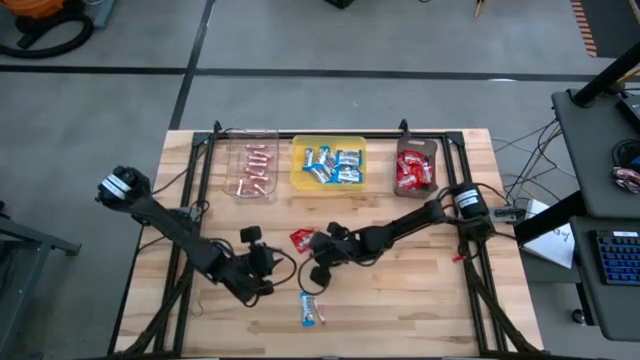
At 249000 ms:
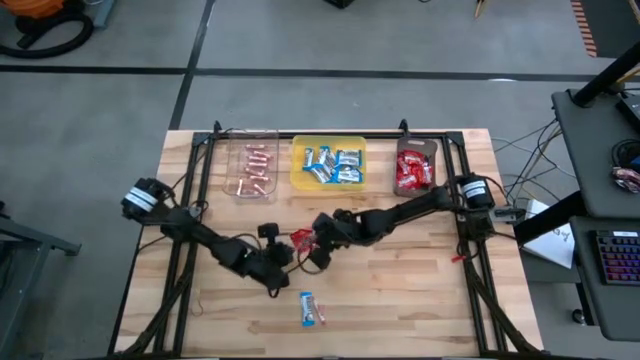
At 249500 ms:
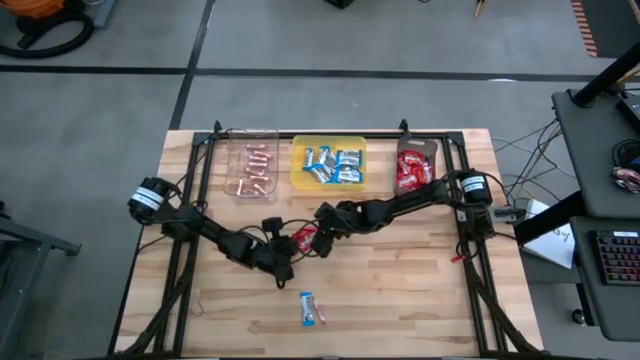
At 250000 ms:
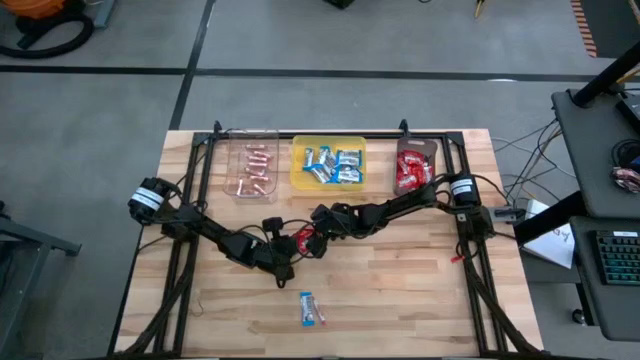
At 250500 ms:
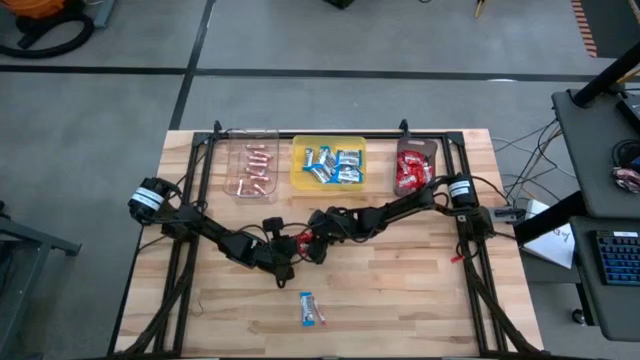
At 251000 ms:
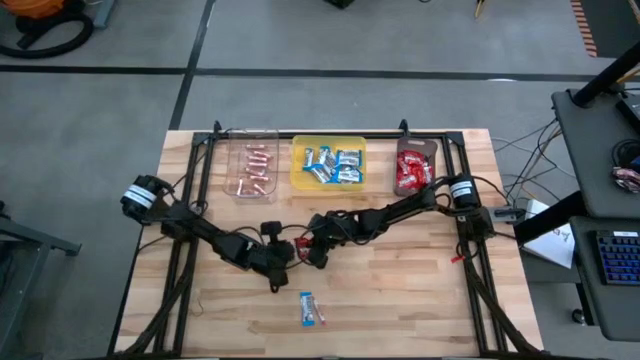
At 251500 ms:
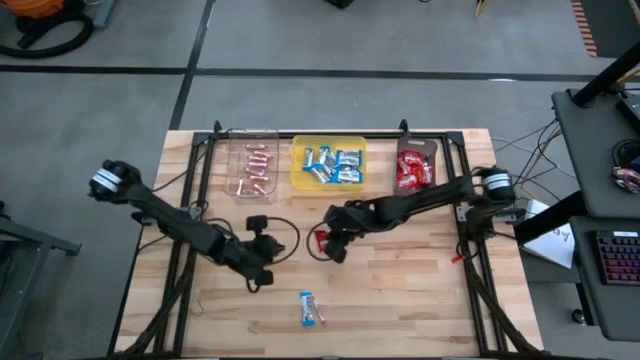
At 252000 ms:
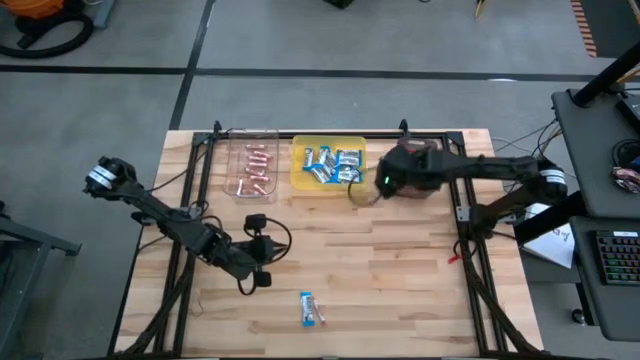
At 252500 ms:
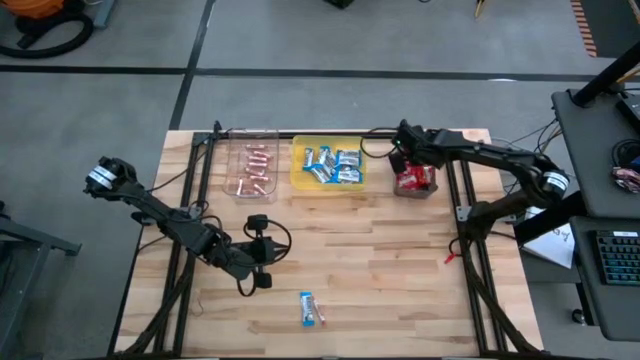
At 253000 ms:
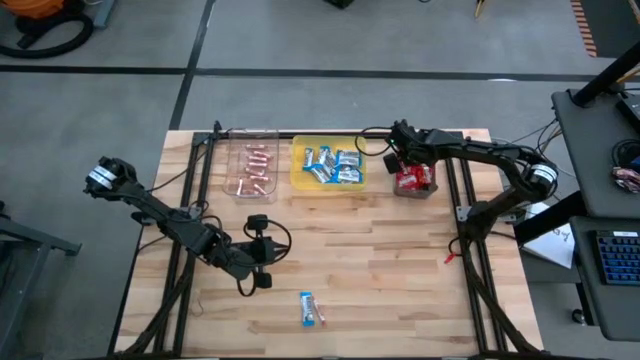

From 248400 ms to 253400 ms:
Task: Sort candy
Put the red candy into the black bin

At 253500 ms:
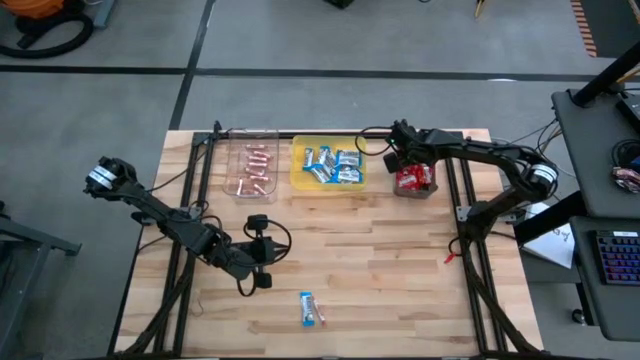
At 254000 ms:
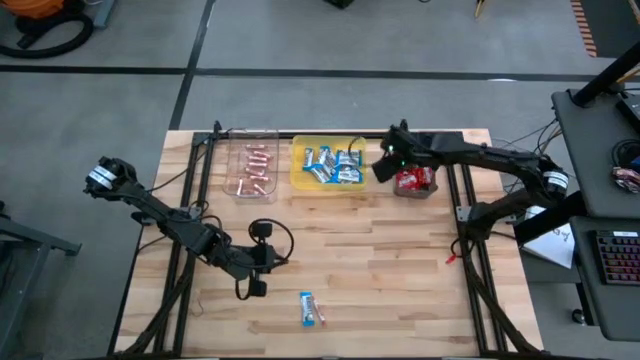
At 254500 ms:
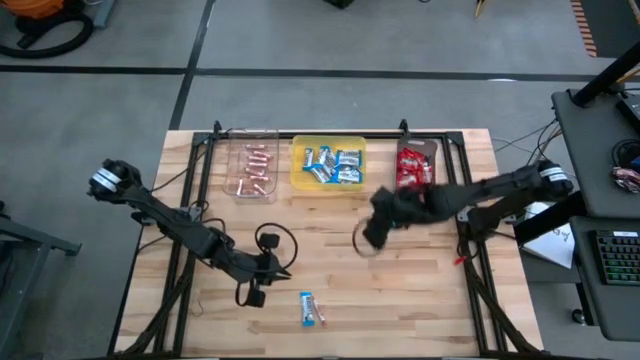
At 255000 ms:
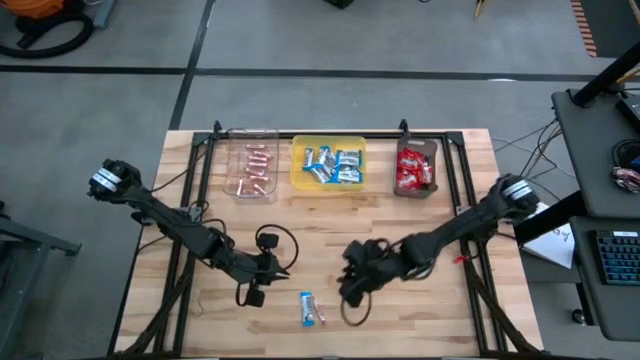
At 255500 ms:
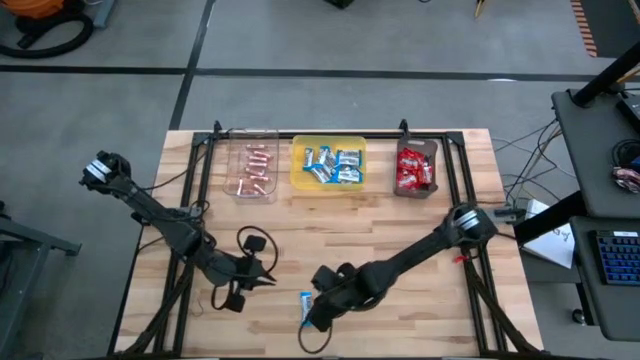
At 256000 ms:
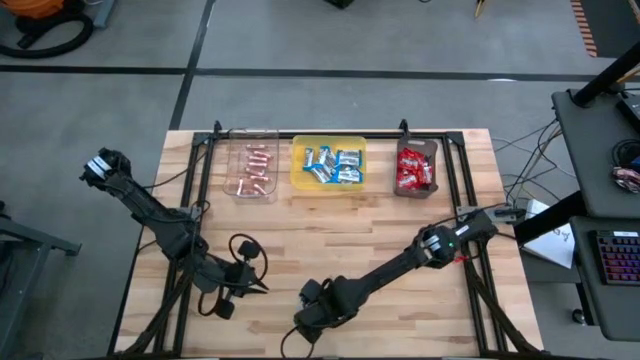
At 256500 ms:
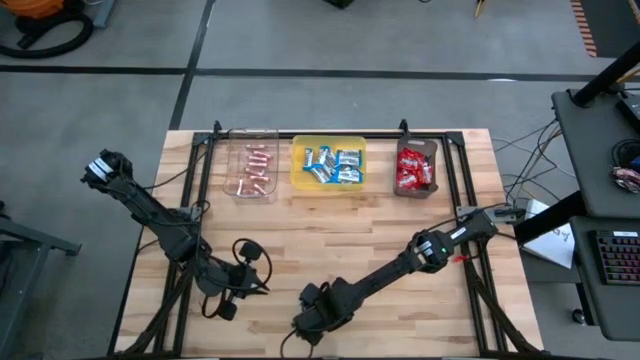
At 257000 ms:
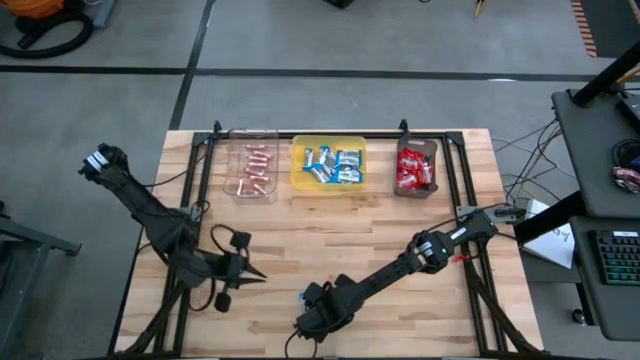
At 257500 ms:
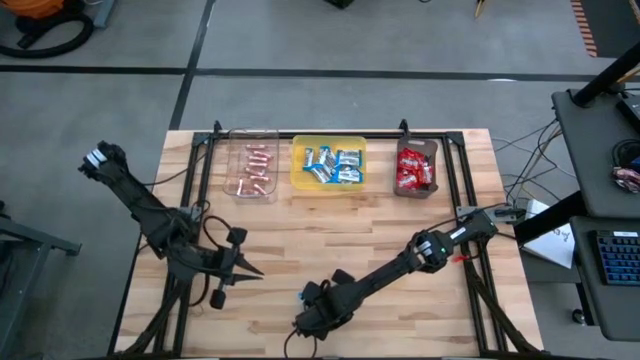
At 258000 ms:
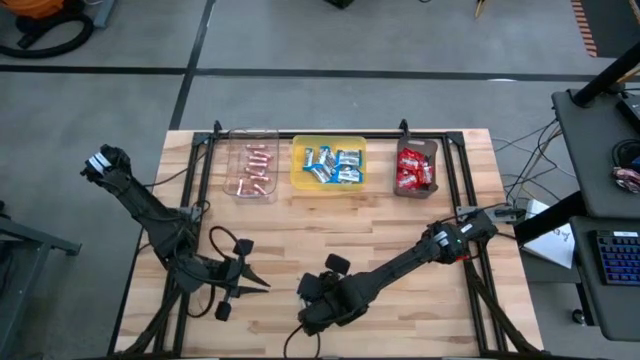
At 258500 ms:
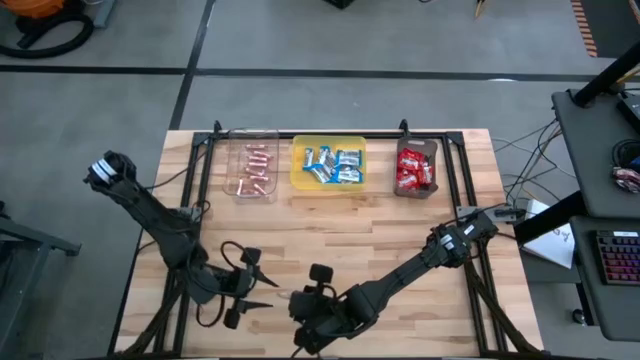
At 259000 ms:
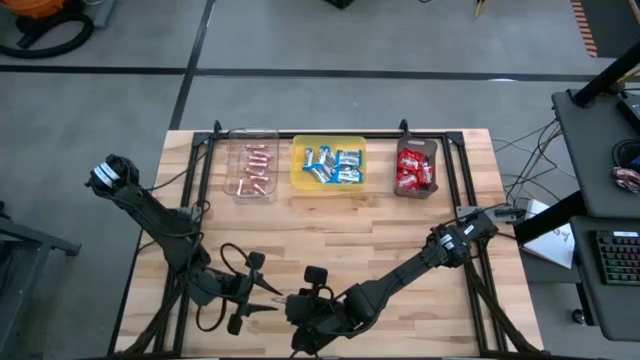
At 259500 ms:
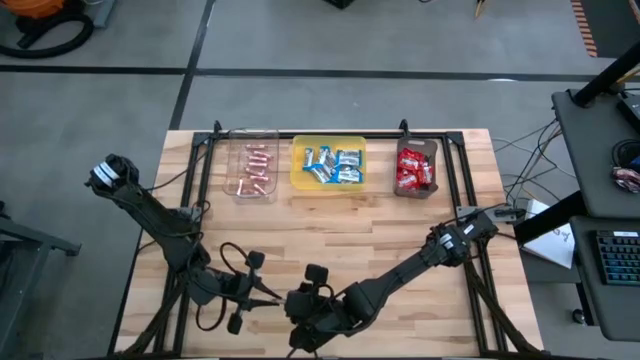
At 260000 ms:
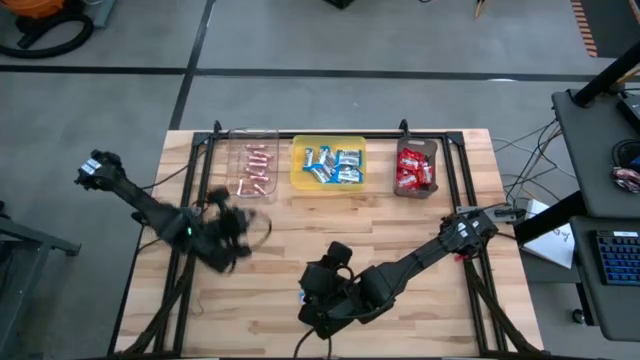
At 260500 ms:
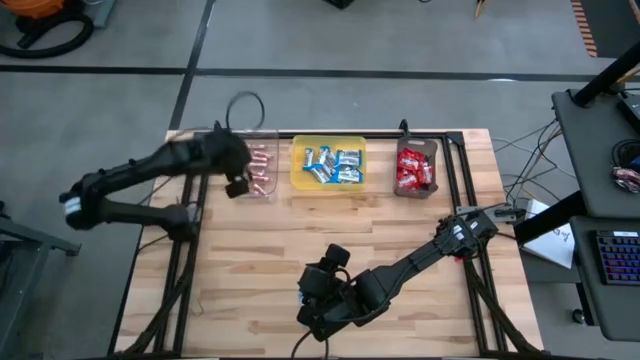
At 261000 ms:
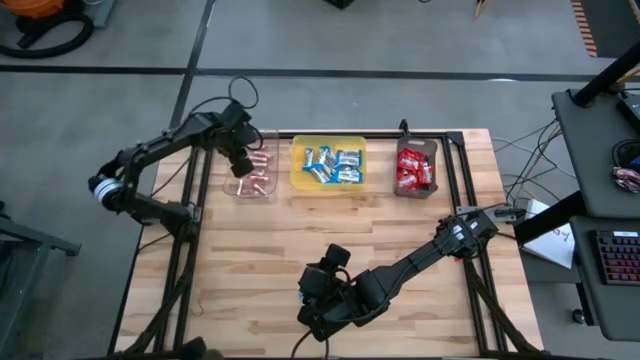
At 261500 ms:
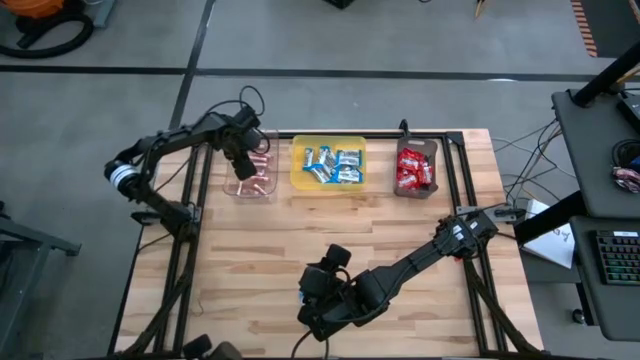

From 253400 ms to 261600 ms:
Put the orange candy into the transparent bin

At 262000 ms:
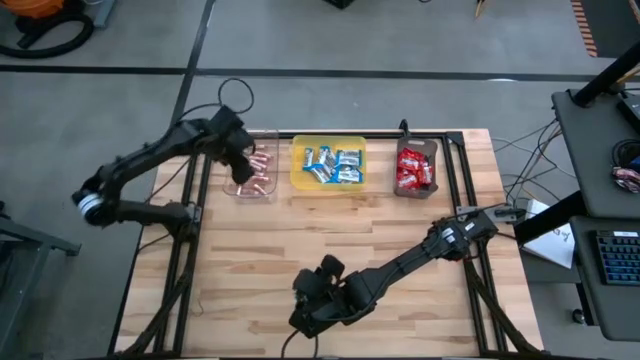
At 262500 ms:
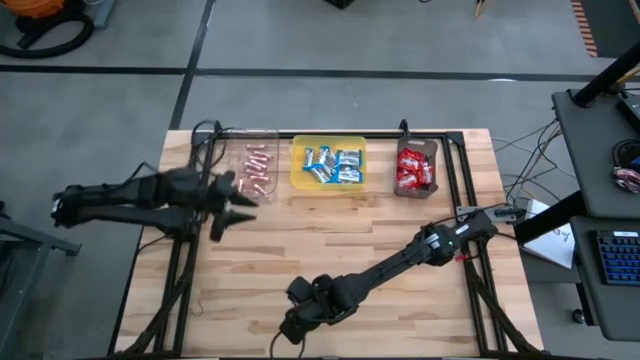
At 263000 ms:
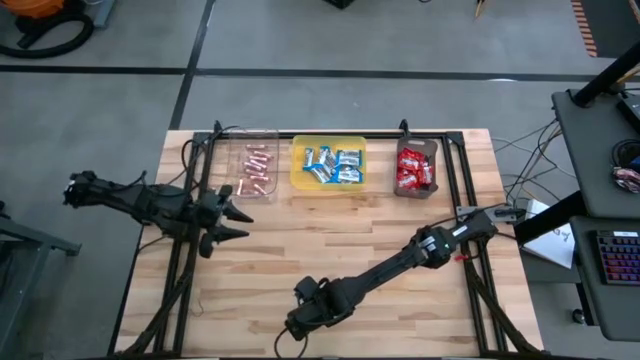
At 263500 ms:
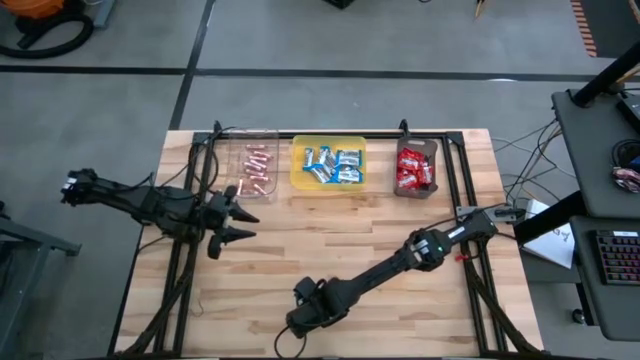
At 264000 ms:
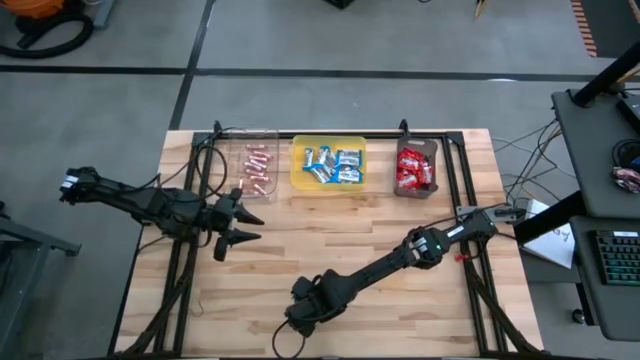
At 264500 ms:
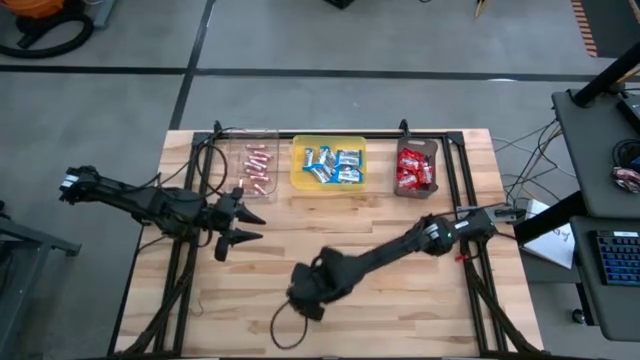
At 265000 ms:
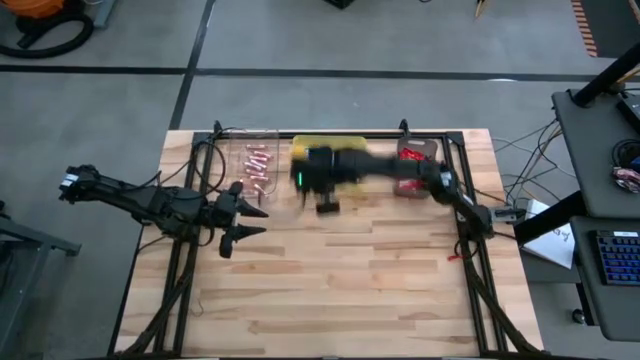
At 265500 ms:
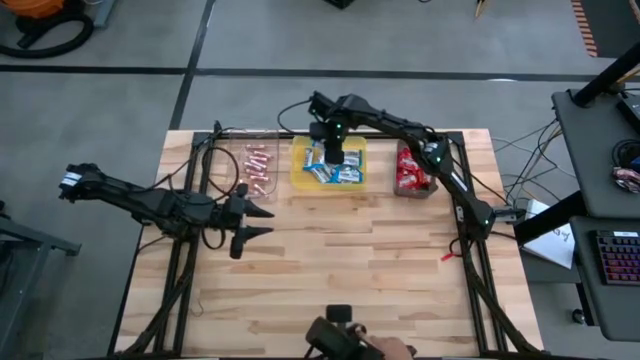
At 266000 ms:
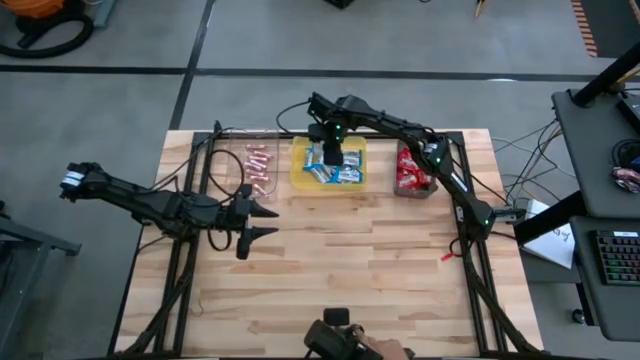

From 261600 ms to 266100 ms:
Put the white chocolate into the yellow bin

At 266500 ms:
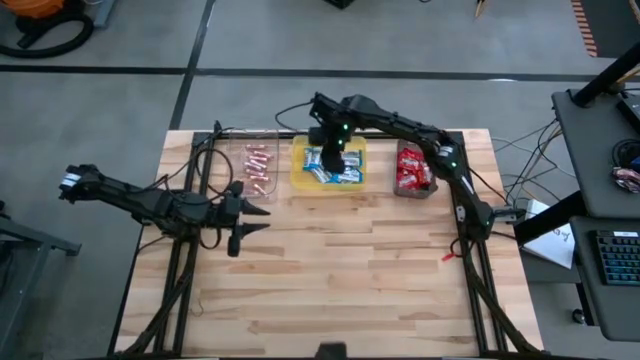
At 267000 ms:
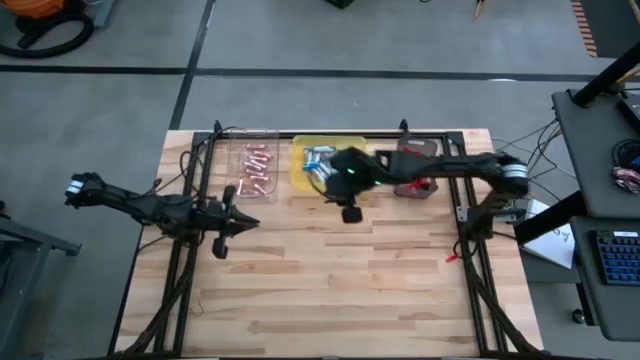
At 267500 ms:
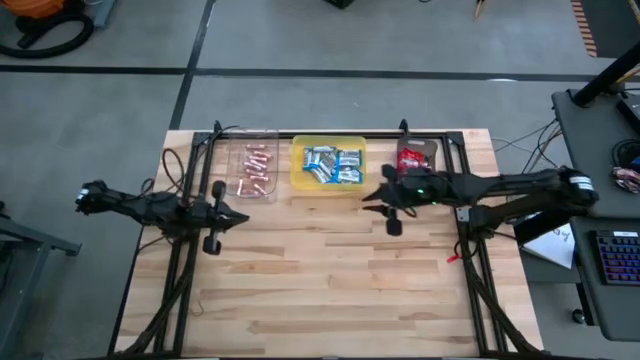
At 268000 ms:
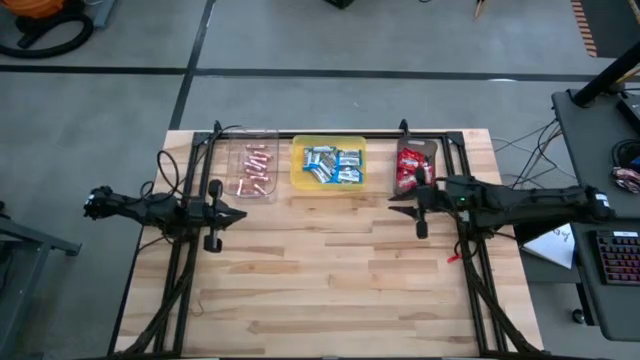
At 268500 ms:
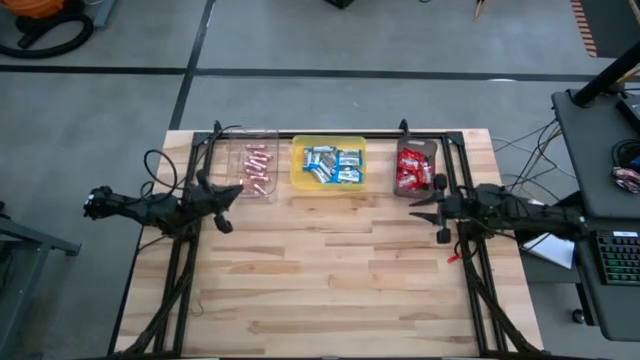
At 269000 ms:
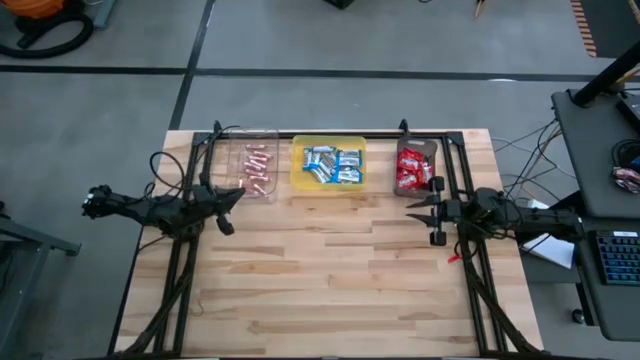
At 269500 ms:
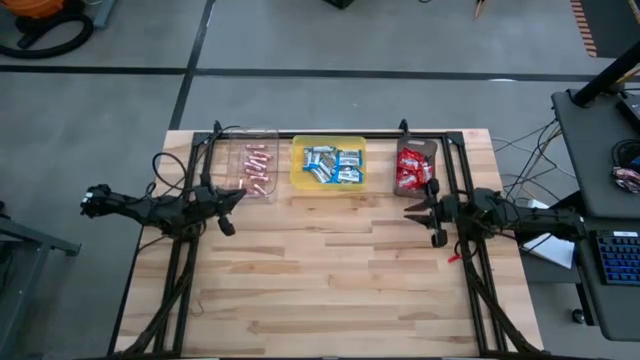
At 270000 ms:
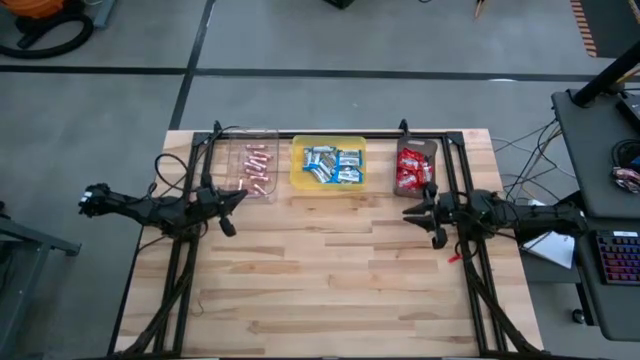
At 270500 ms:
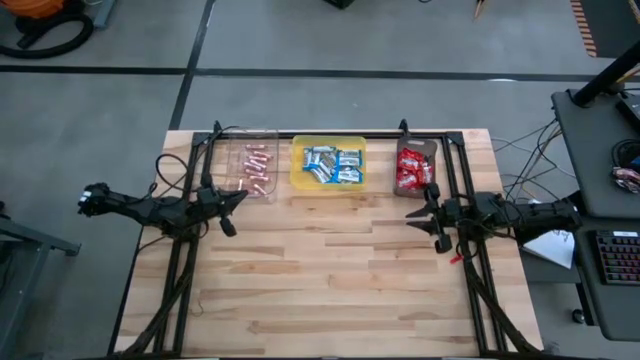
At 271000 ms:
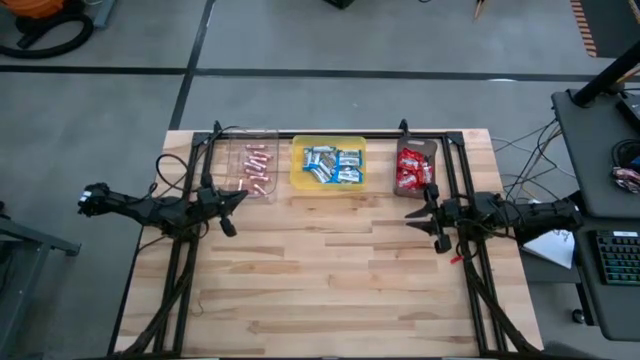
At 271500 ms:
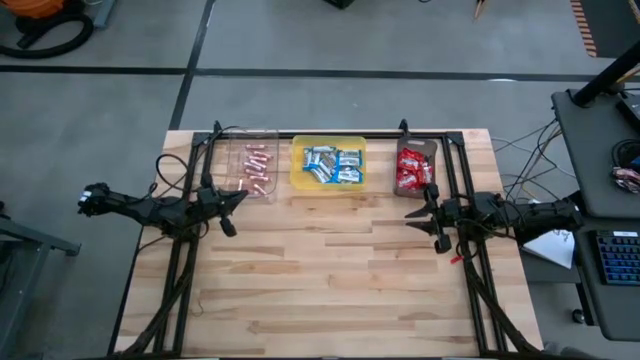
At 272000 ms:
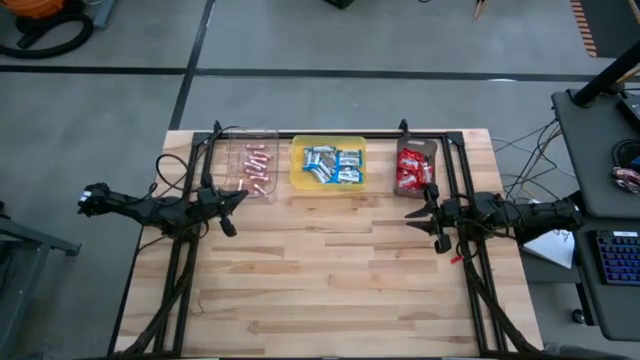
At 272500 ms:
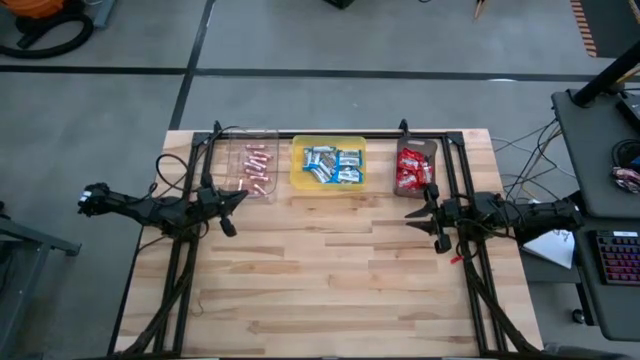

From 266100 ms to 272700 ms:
Return to Home Position
